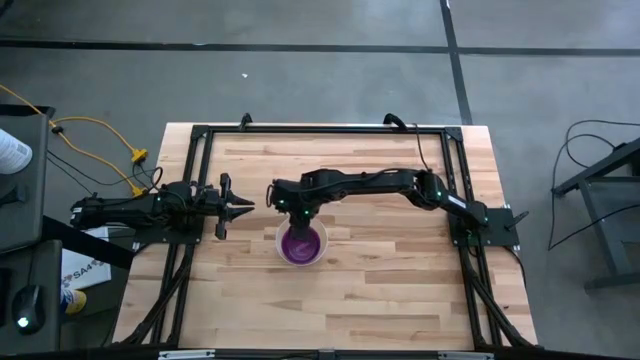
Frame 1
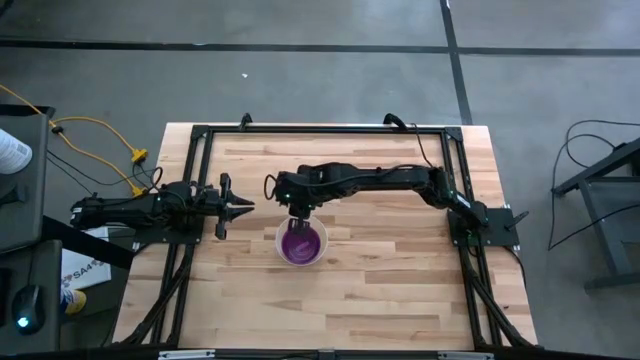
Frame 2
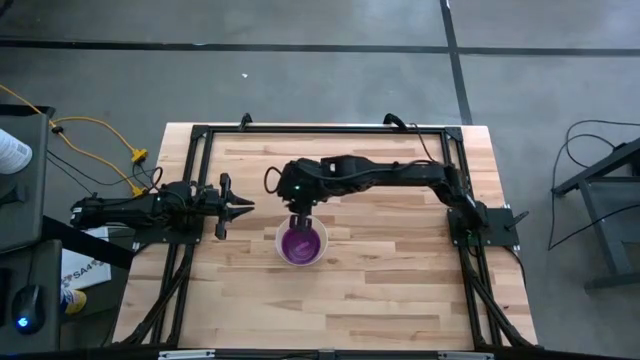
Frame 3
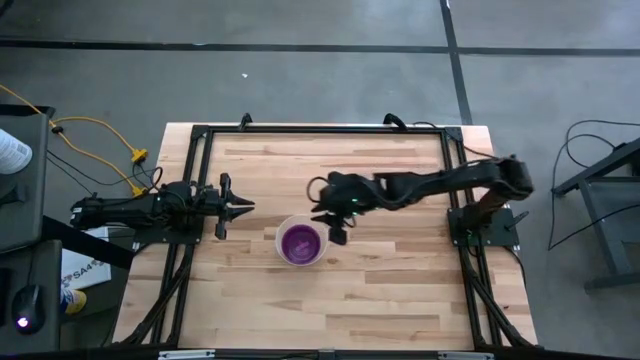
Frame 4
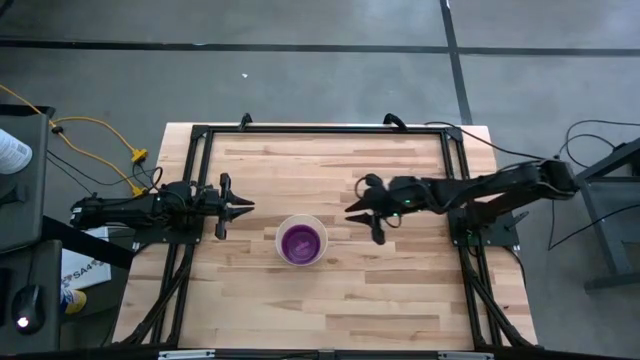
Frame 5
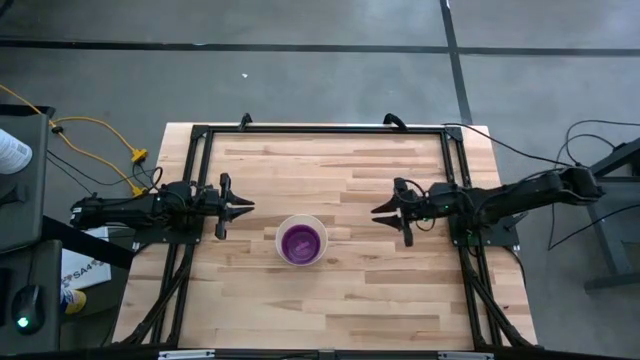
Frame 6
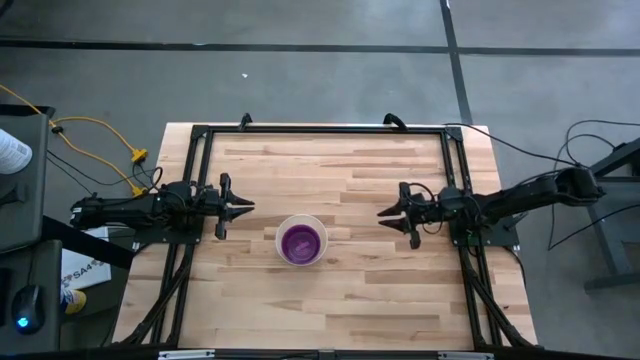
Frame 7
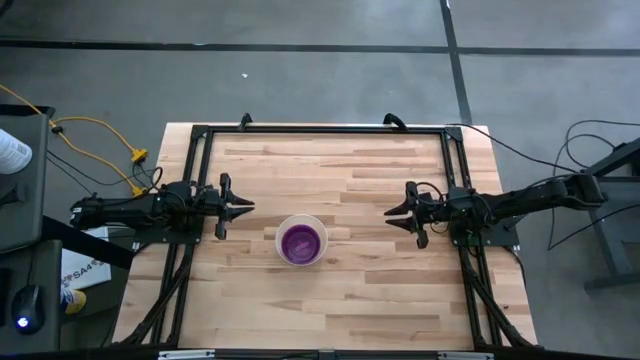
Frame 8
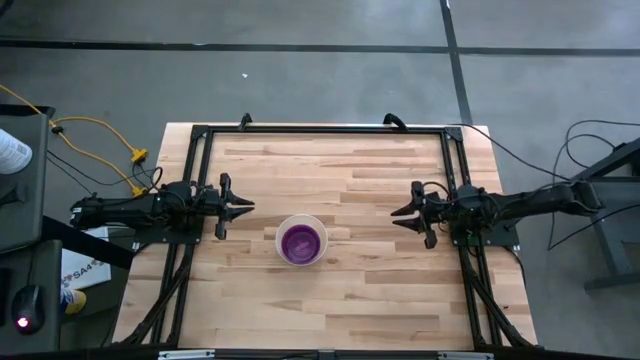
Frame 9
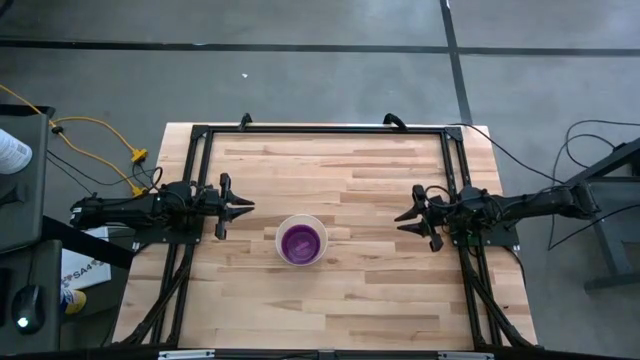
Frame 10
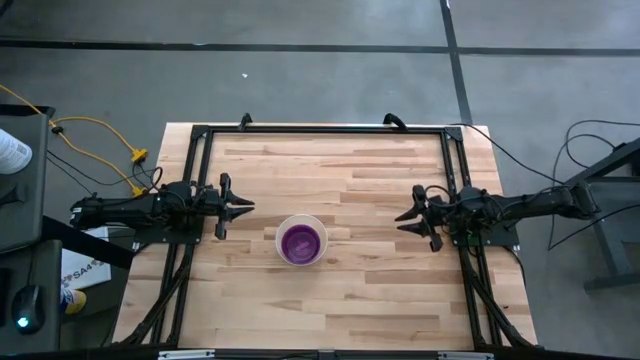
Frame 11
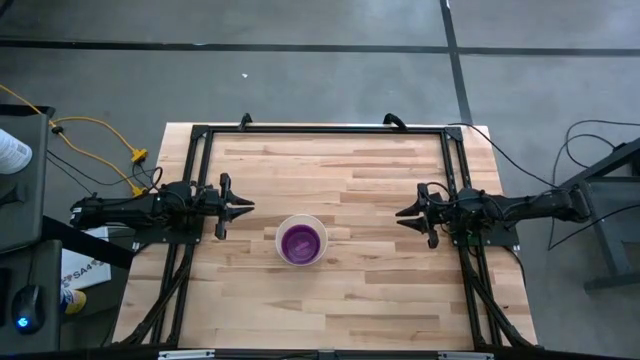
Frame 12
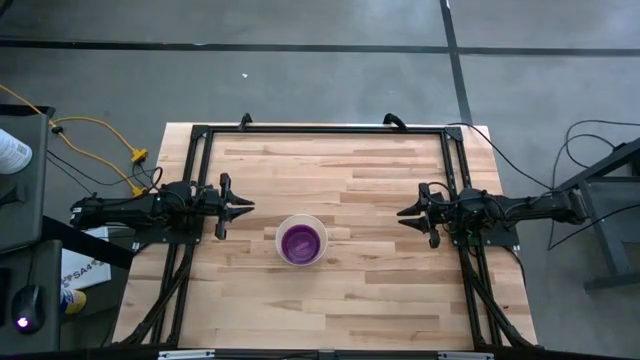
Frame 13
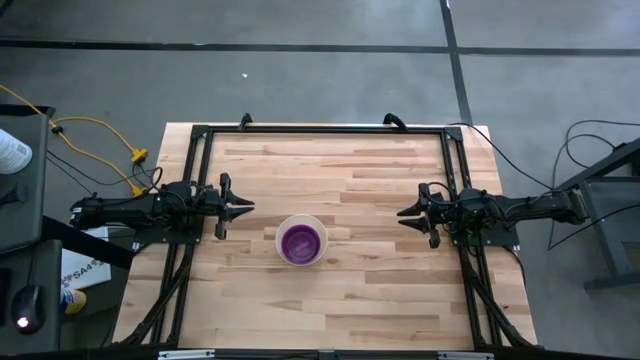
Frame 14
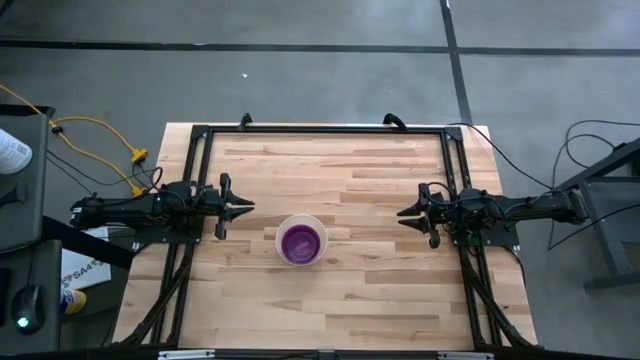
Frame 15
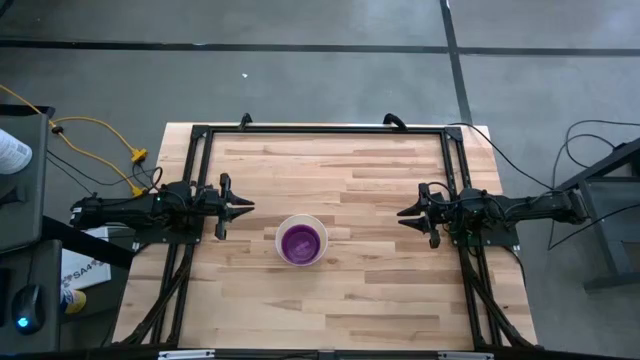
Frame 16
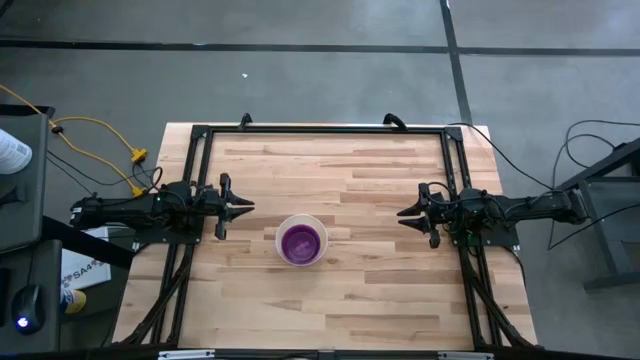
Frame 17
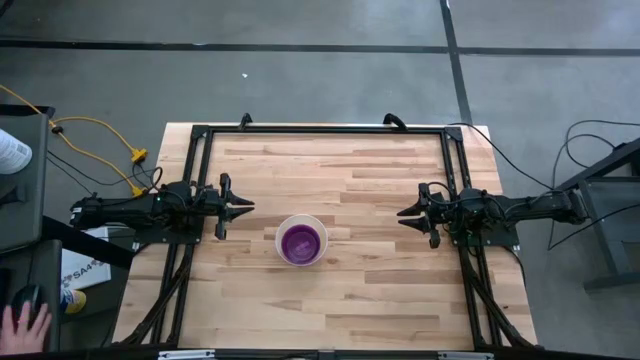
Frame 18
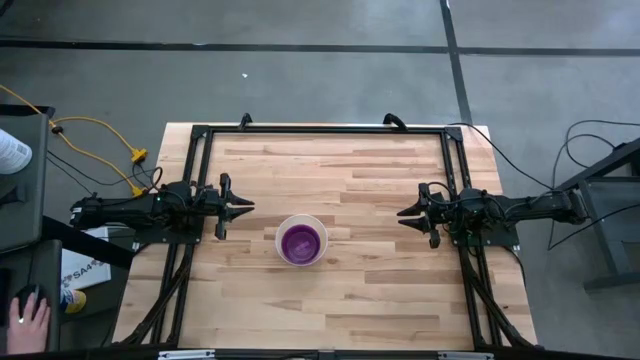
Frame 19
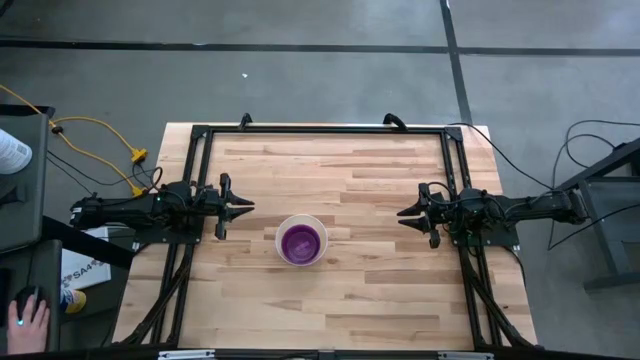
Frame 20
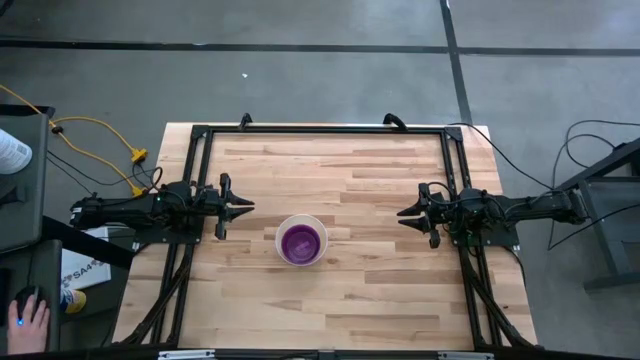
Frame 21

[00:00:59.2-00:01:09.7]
Return to Home Position
